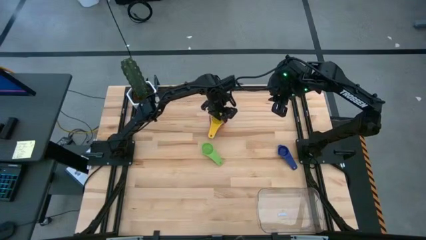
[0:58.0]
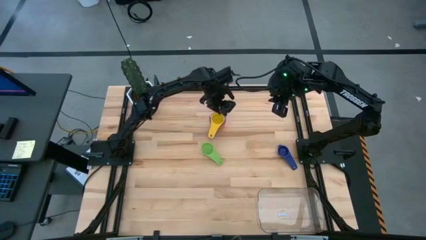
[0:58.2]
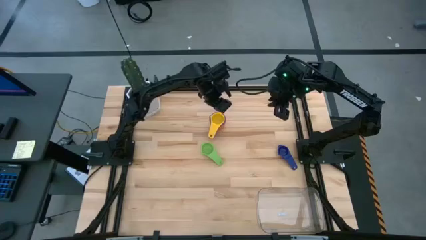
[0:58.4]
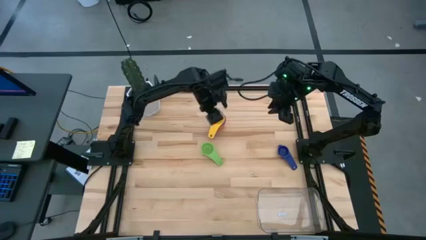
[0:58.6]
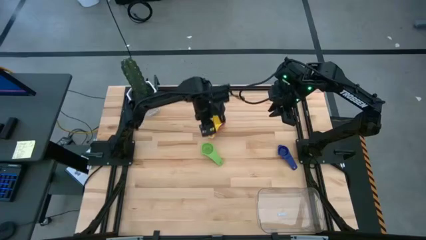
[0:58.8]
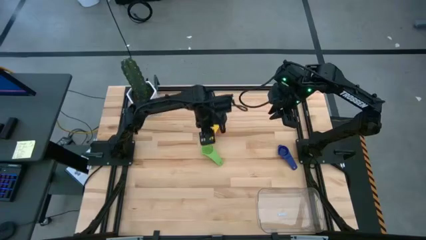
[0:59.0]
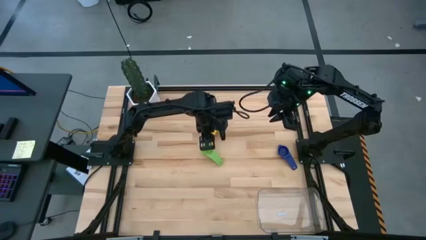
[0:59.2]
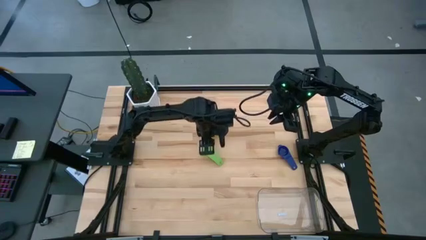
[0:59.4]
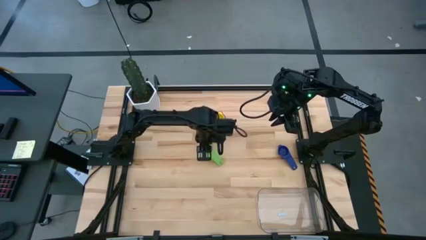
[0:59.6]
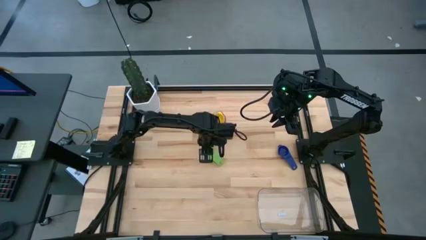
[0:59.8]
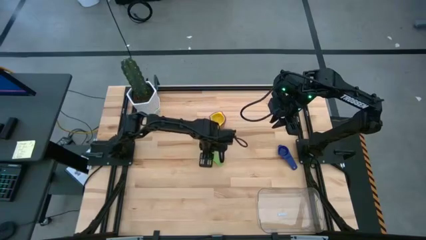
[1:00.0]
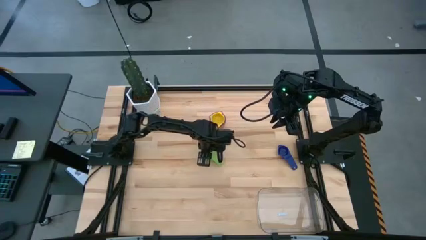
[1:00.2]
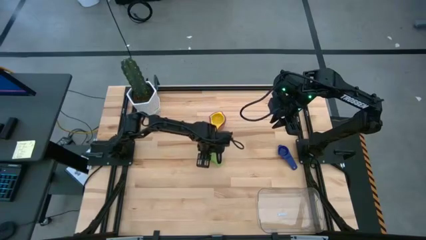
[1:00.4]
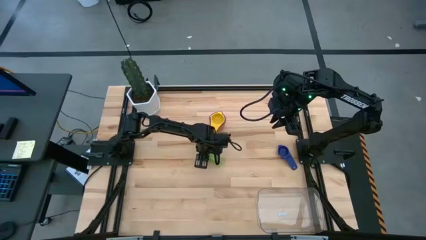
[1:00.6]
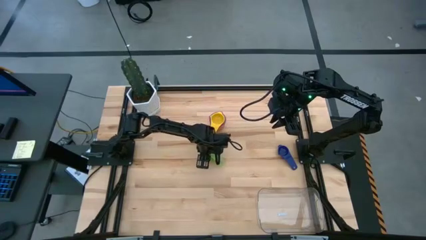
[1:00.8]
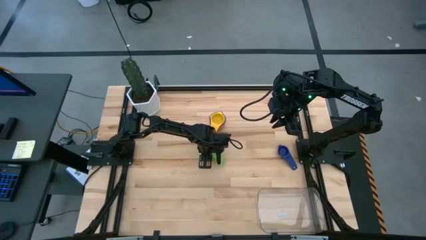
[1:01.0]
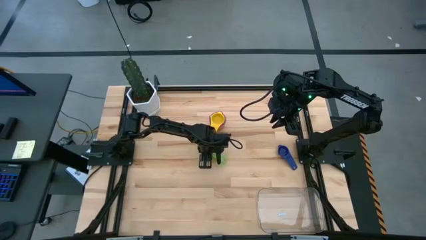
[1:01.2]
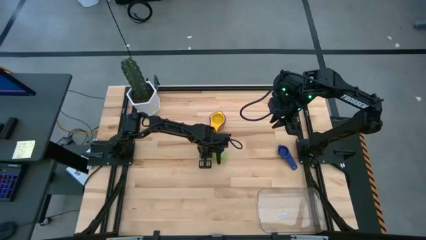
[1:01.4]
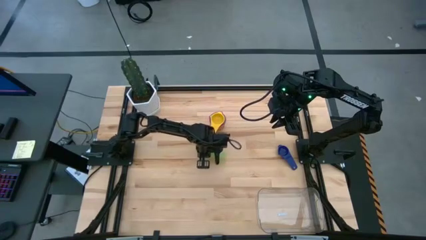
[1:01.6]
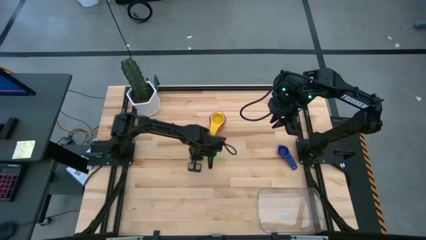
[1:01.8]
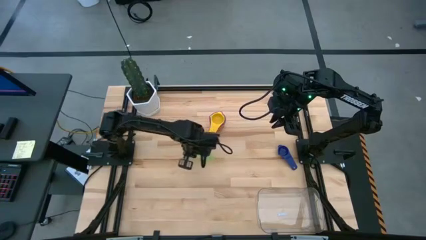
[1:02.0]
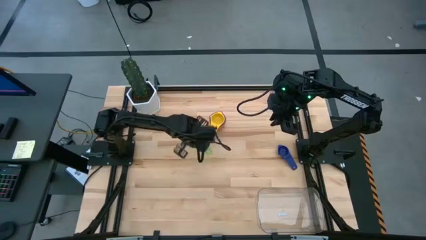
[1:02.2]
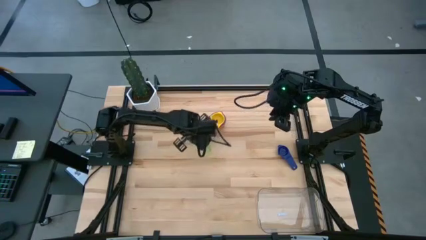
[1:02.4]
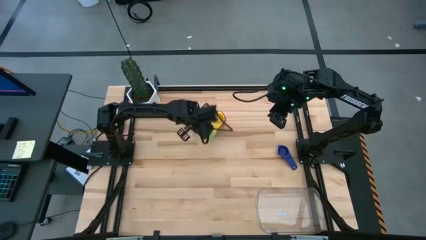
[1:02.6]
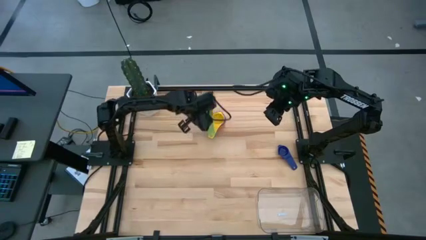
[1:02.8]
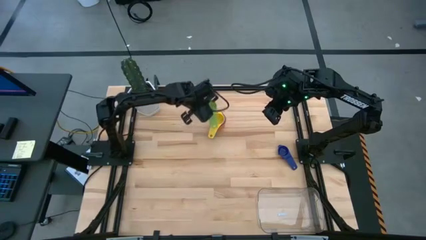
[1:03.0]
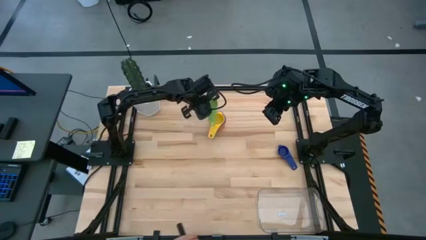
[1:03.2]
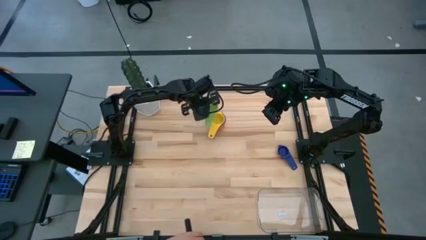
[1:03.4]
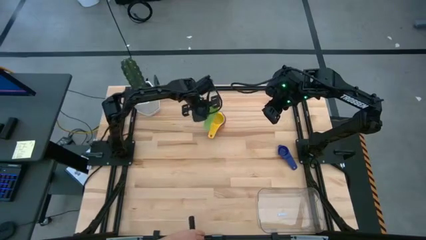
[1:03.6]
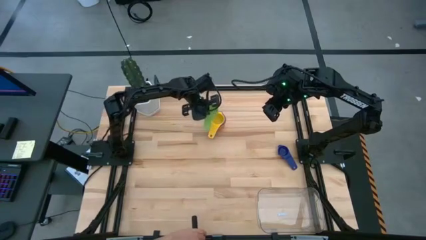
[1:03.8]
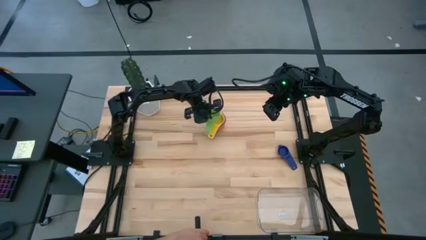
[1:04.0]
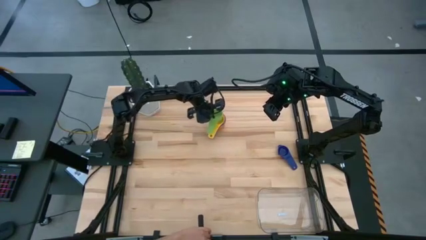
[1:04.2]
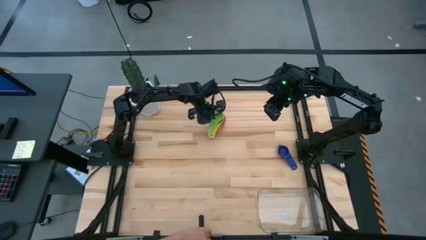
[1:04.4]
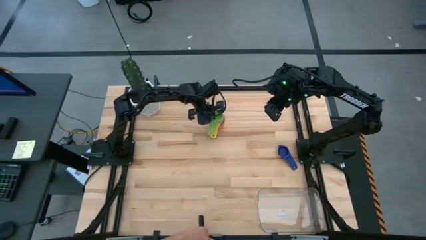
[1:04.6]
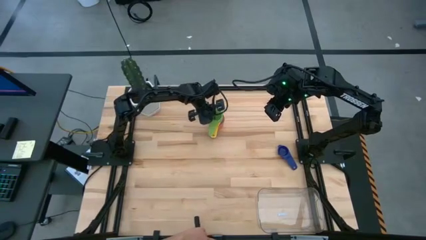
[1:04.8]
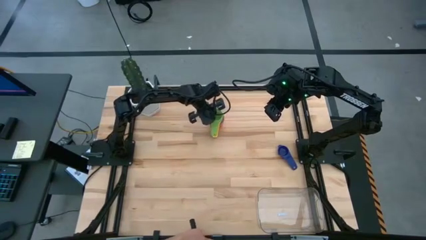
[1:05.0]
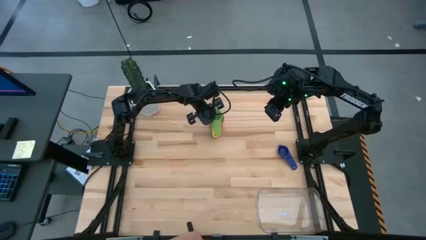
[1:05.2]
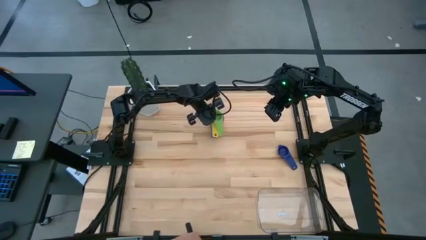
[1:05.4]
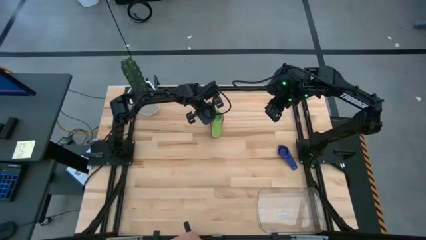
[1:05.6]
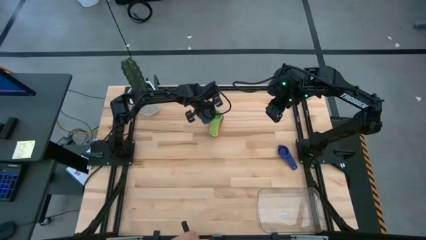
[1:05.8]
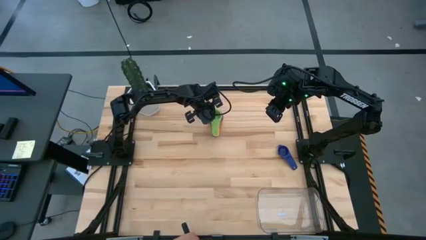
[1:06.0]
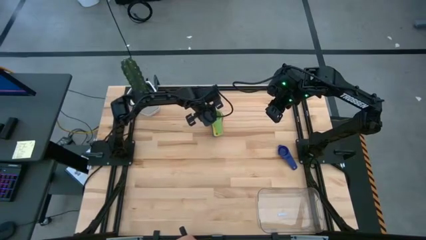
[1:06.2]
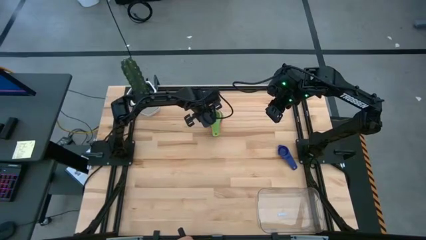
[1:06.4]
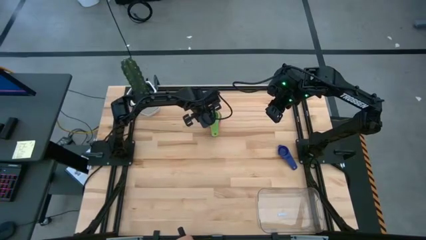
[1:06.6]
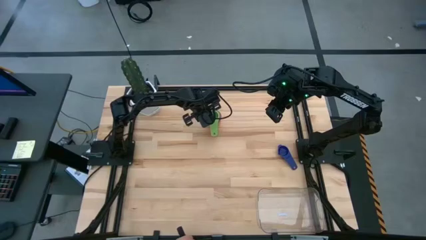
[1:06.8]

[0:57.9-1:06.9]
Task: Nest measuring cups in basket
Stack the green measuring cup on top of the yellow measuring cup

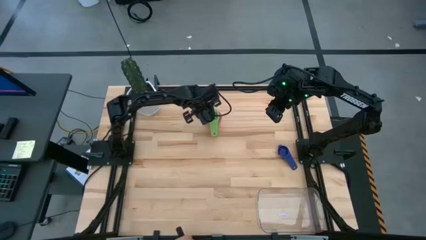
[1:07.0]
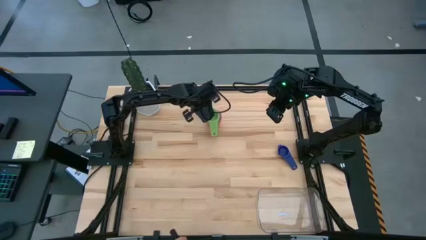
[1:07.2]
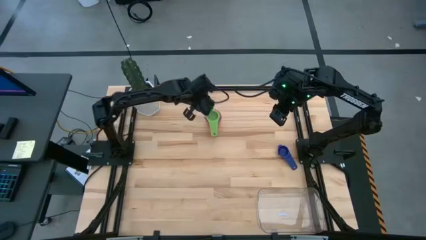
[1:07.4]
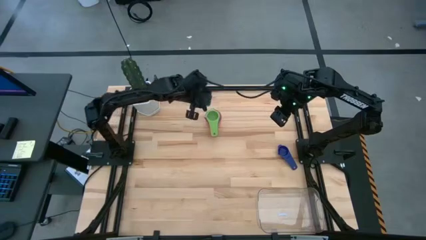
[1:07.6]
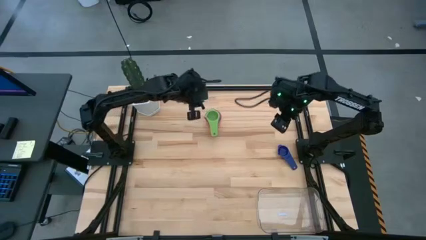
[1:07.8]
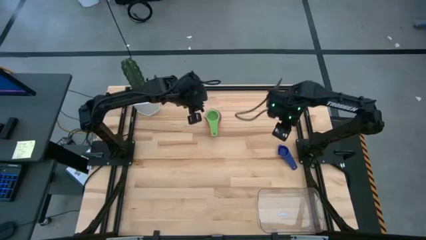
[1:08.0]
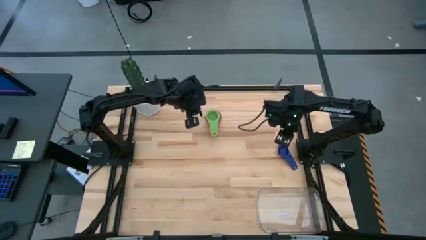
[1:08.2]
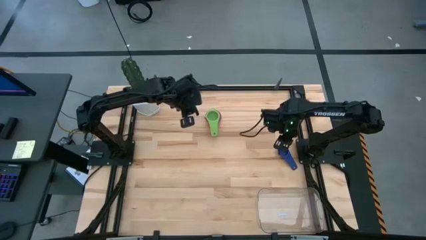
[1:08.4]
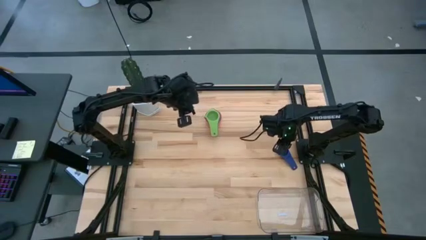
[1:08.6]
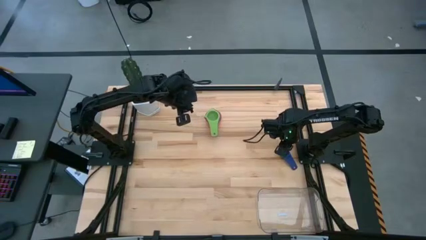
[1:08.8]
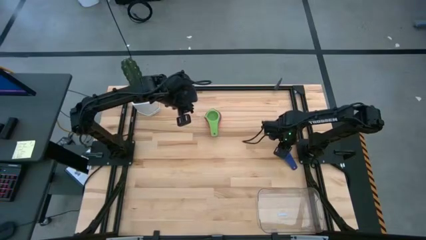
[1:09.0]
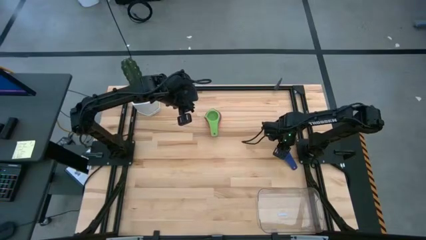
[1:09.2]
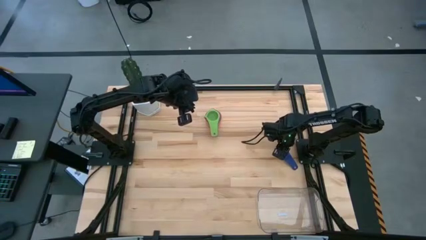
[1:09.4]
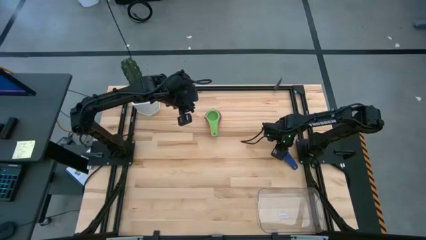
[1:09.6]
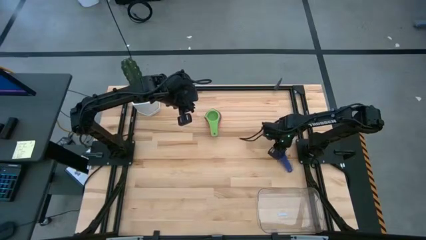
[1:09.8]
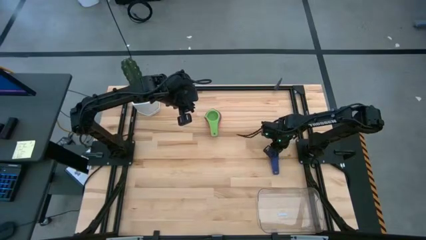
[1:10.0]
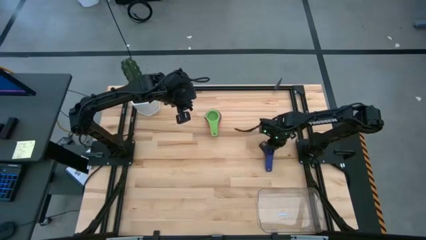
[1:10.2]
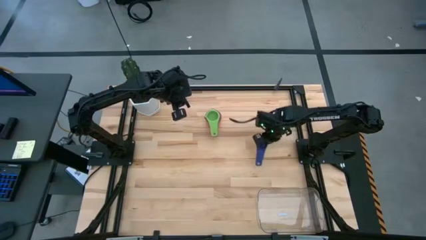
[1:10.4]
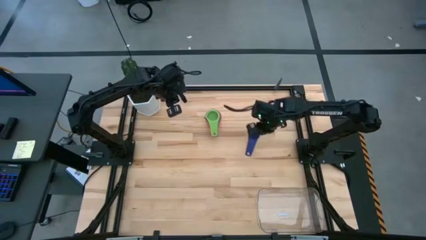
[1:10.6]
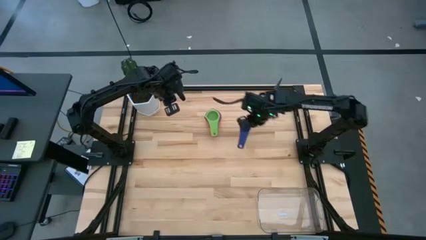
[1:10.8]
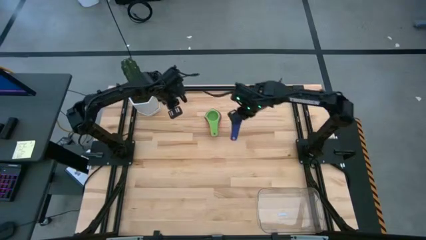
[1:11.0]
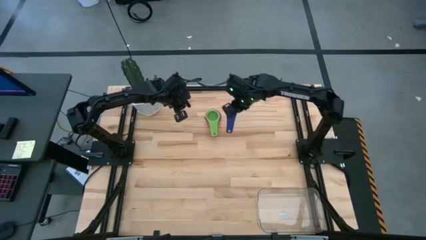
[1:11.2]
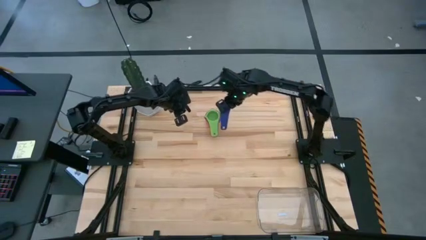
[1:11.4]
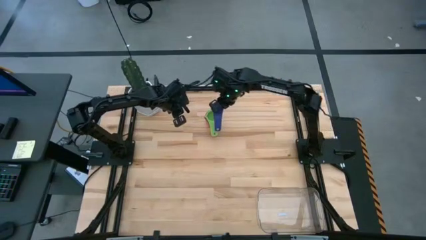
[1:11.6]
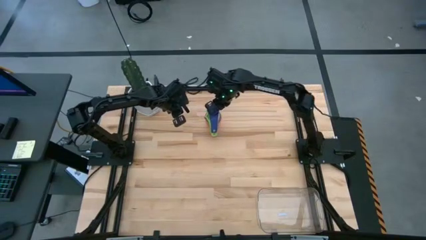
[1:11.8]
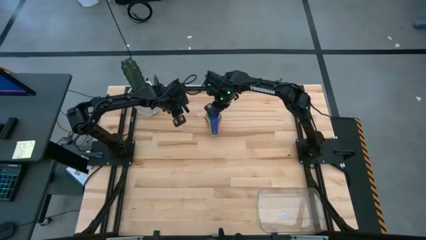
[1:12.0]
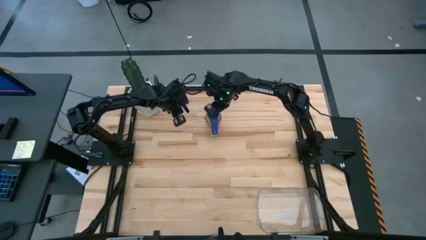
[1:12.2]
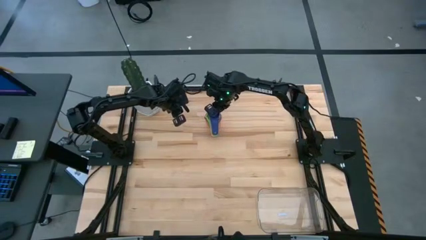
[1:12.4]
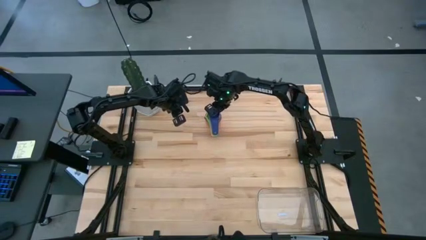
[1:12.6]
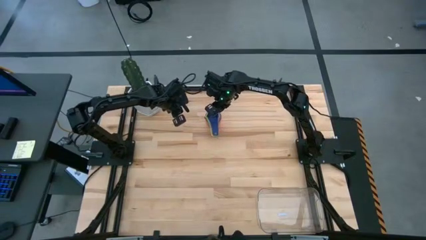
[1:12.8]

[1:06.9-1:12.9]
Stack the violet measuring cup on top of the green measuring cup

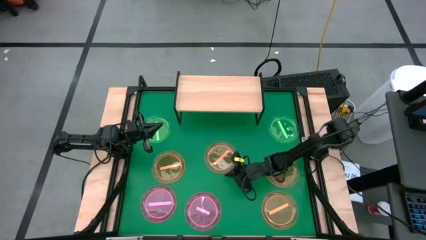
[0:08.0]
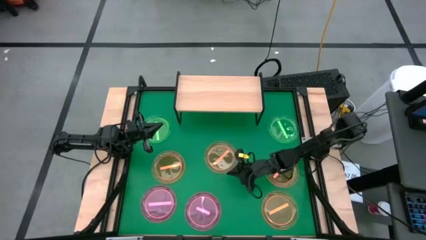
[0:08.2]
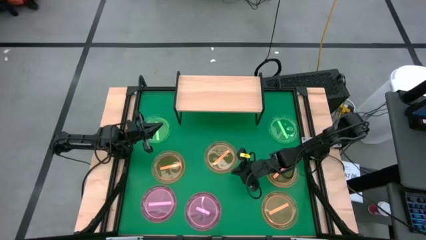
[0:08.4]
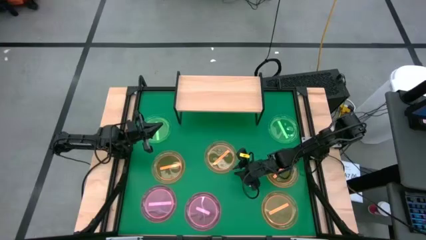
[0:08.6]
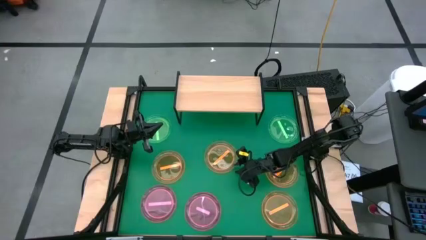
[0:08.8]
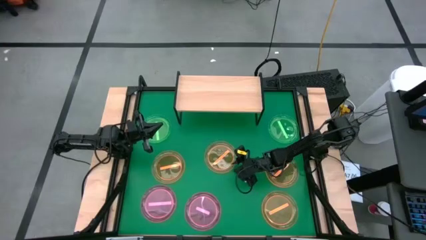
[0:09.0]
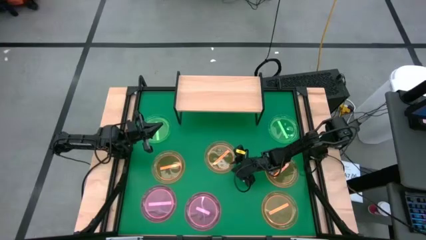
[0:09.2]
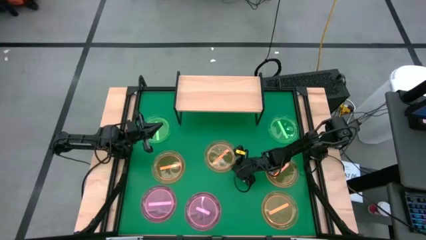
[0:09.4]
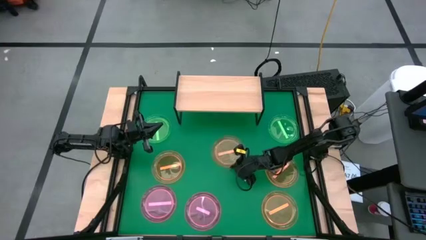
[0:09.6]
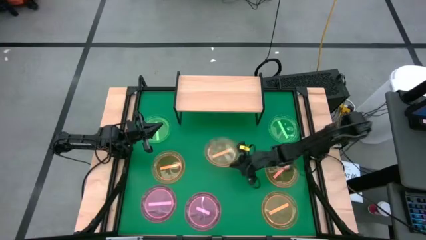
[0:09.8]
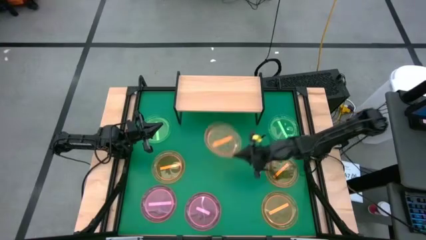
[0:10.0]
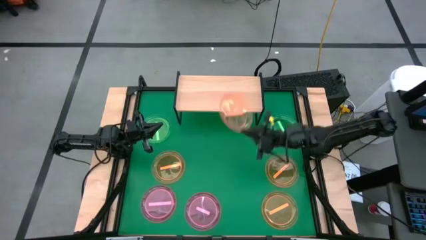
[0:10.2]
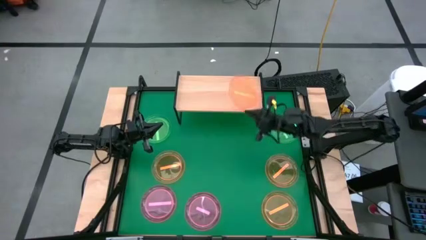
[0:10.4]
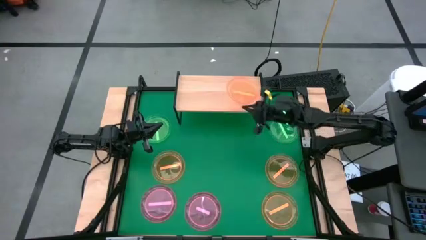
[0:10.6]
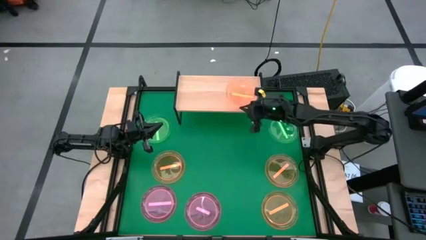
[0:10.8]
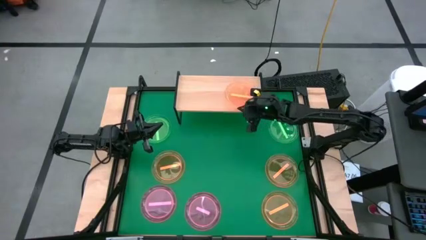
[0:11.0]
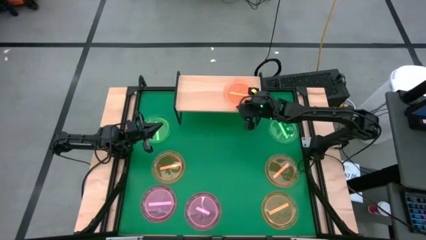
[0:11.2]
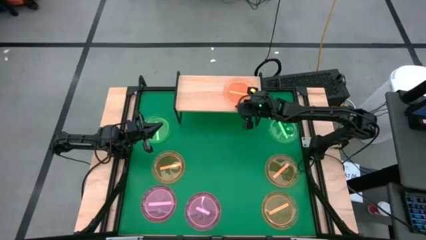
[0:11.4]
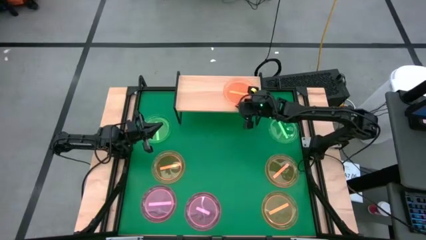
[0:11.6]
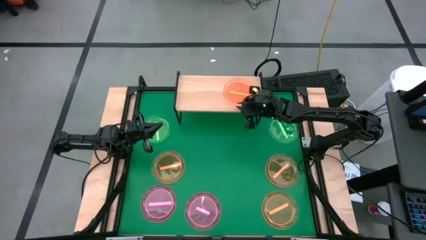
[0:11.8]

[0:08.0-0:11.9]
Task: Place and stack plates onto a shelf
Put the orange plate on the shelf
